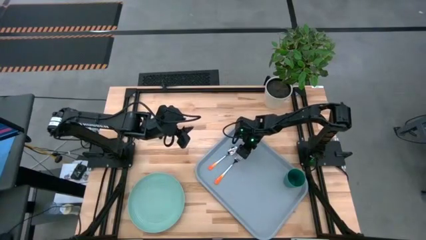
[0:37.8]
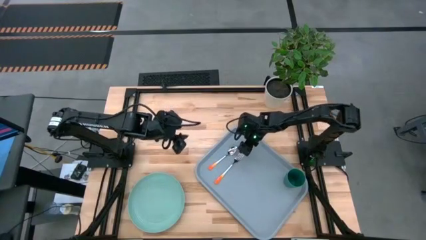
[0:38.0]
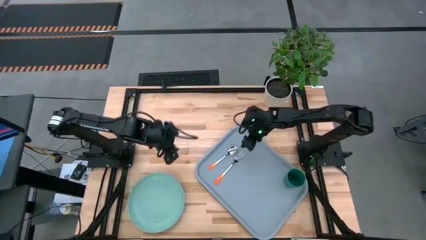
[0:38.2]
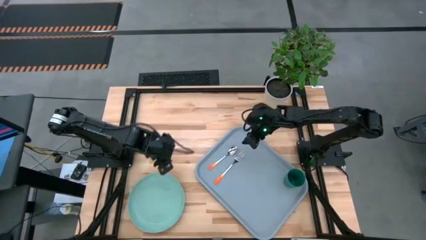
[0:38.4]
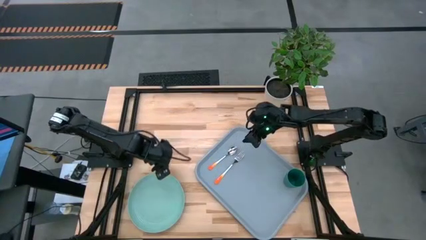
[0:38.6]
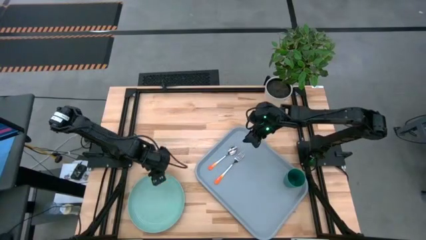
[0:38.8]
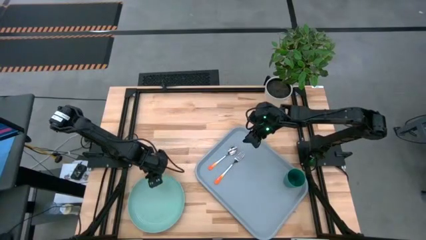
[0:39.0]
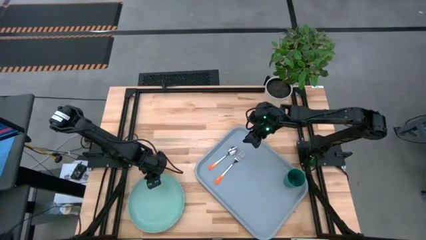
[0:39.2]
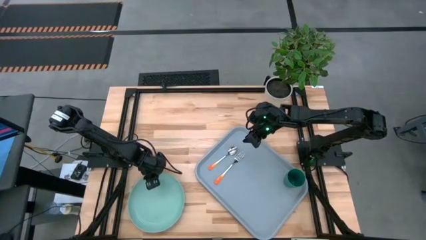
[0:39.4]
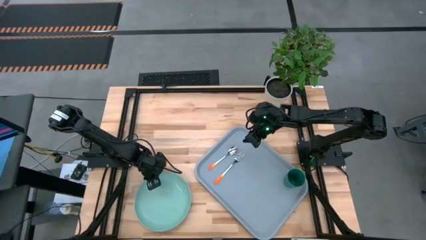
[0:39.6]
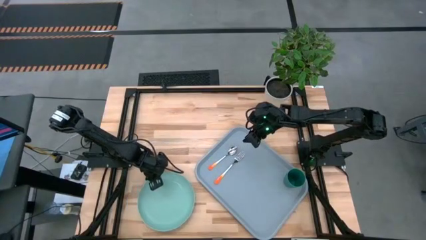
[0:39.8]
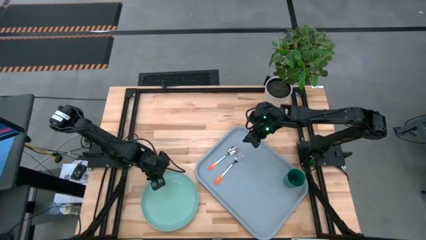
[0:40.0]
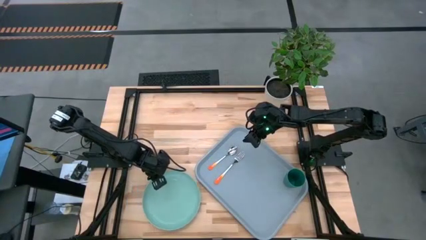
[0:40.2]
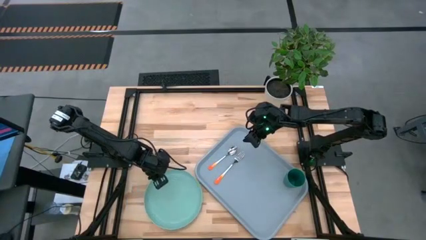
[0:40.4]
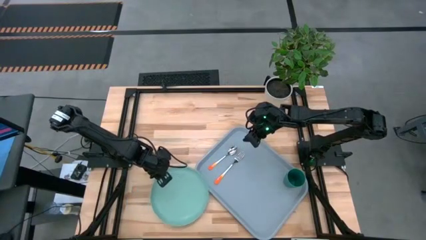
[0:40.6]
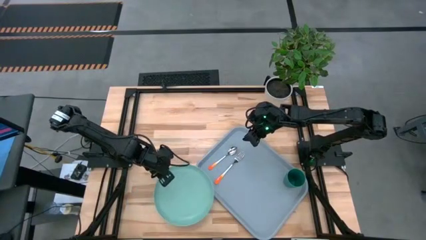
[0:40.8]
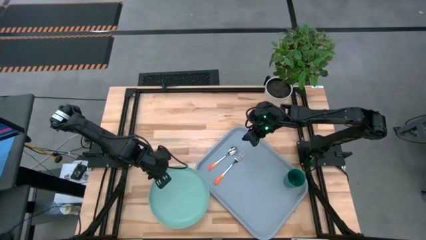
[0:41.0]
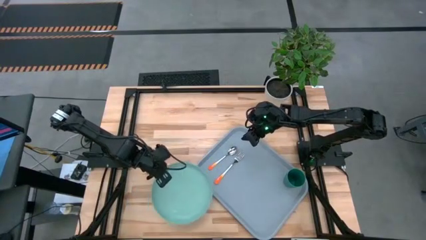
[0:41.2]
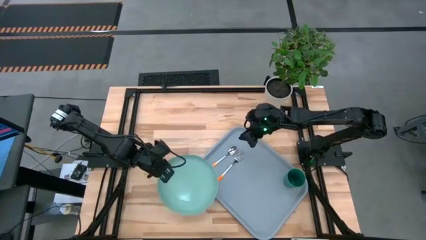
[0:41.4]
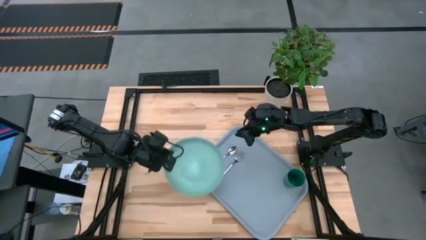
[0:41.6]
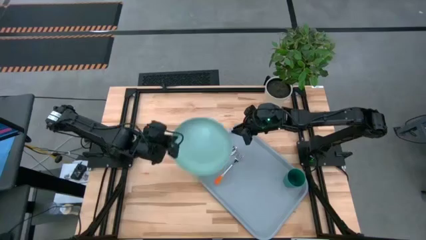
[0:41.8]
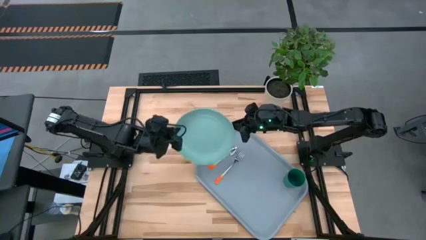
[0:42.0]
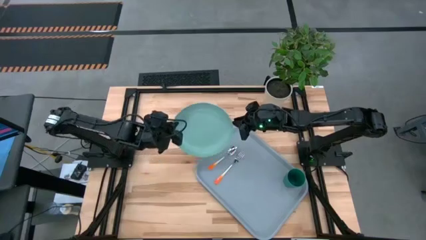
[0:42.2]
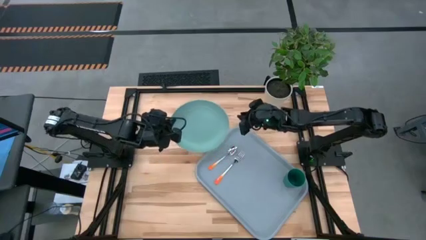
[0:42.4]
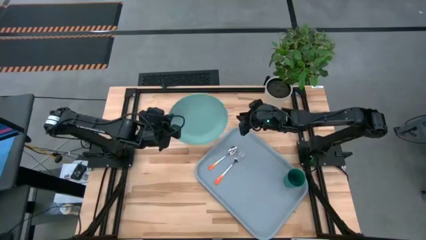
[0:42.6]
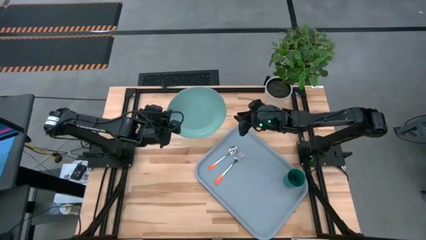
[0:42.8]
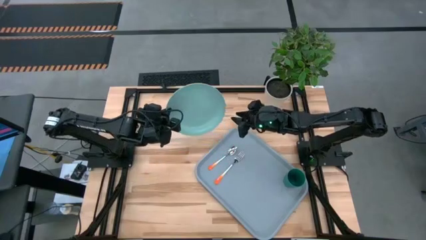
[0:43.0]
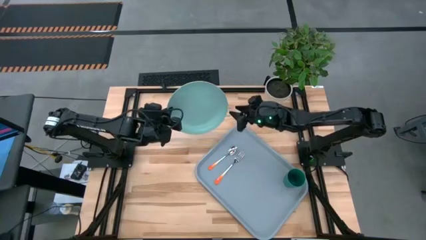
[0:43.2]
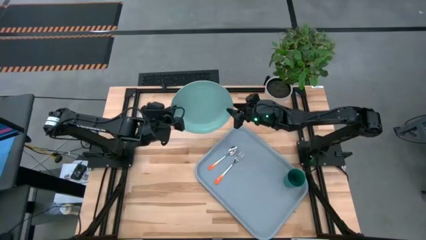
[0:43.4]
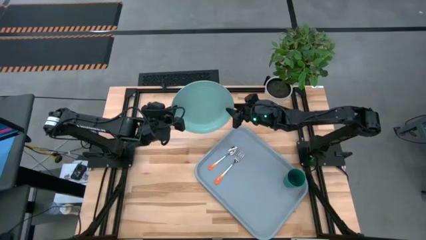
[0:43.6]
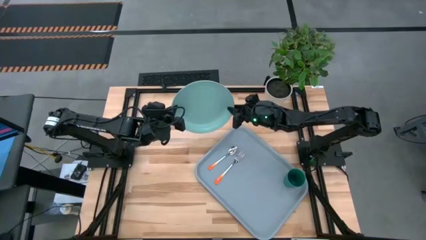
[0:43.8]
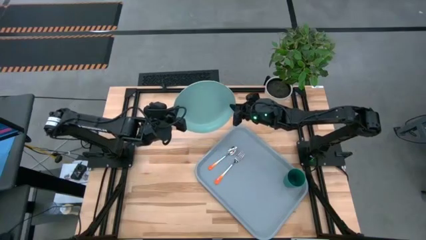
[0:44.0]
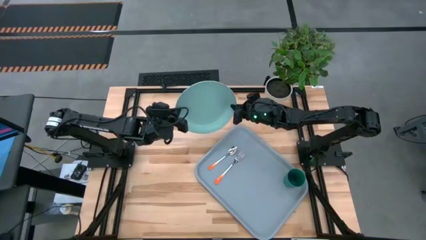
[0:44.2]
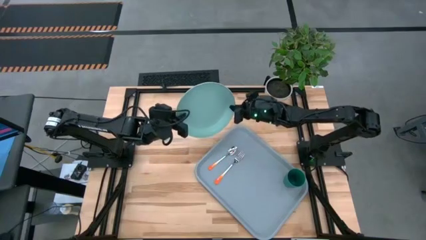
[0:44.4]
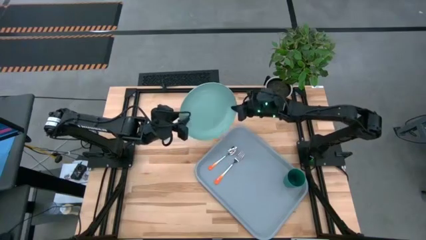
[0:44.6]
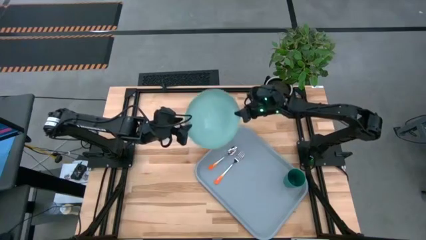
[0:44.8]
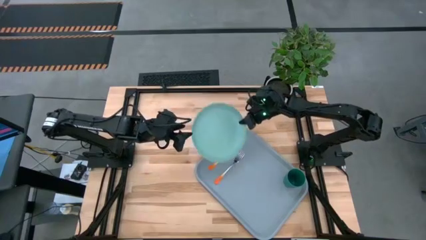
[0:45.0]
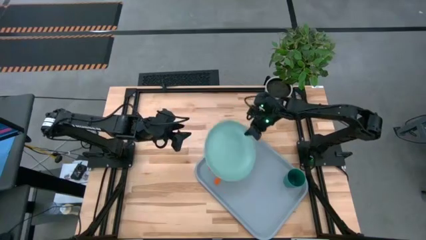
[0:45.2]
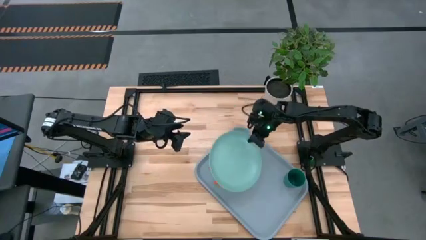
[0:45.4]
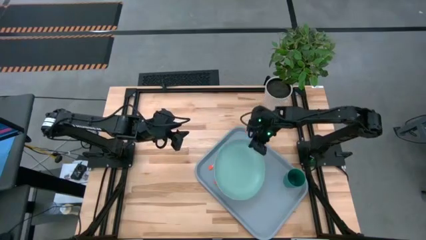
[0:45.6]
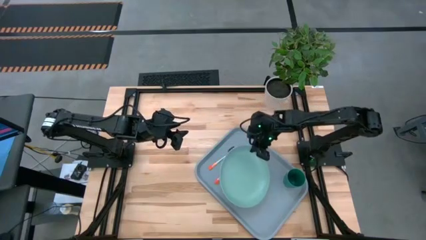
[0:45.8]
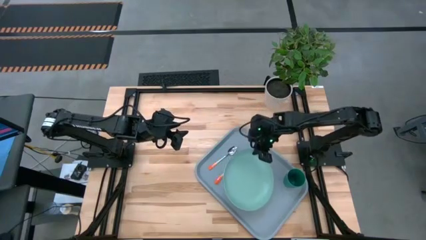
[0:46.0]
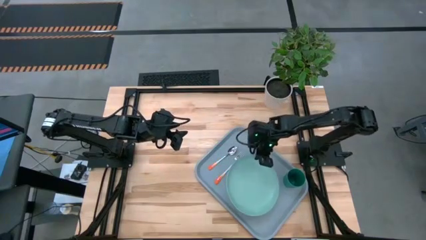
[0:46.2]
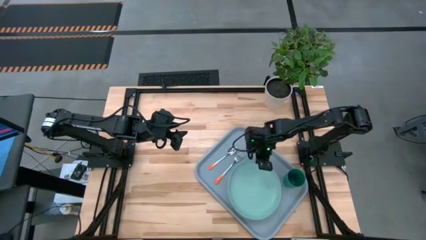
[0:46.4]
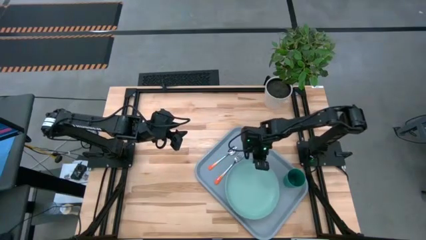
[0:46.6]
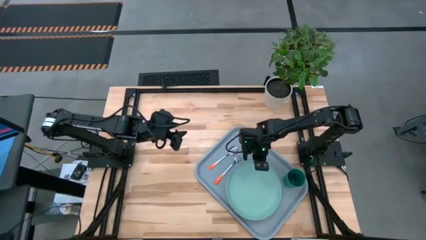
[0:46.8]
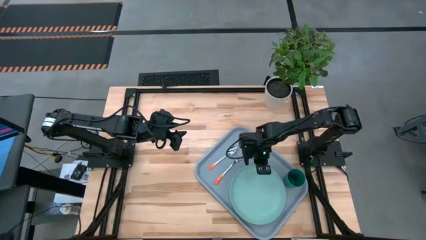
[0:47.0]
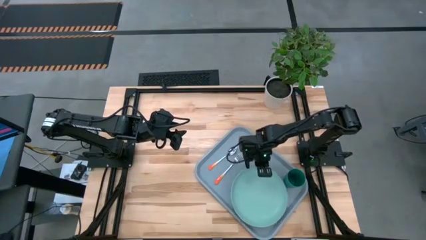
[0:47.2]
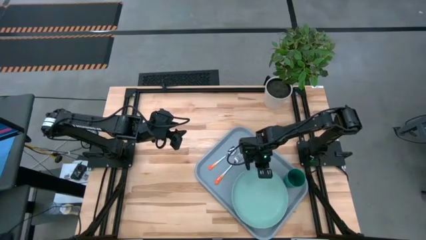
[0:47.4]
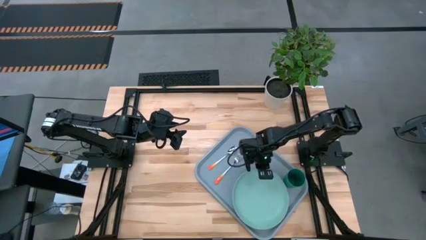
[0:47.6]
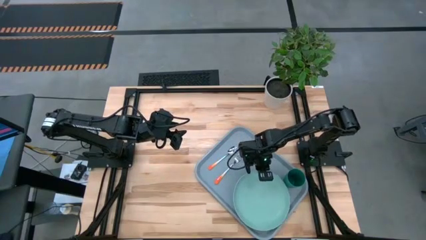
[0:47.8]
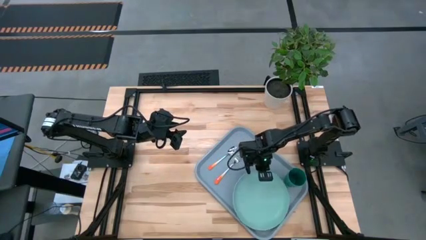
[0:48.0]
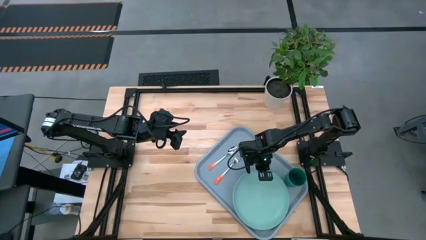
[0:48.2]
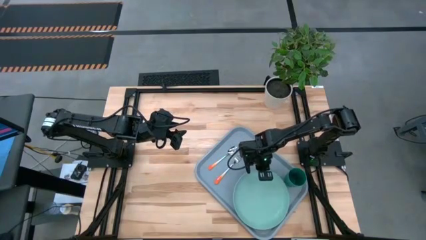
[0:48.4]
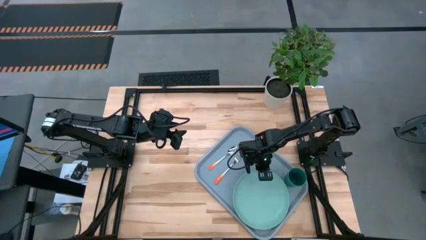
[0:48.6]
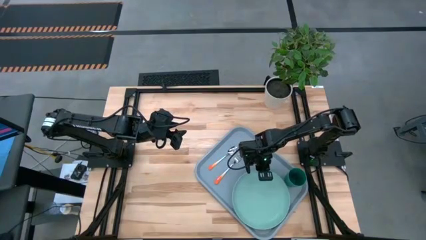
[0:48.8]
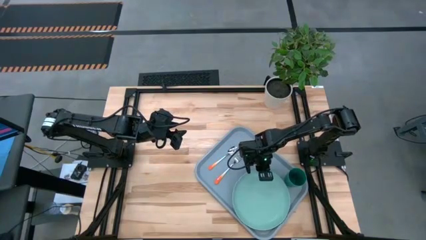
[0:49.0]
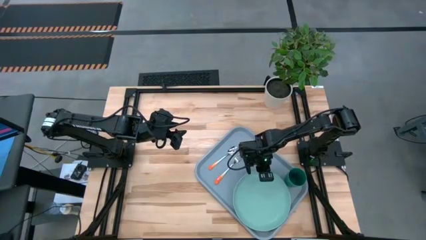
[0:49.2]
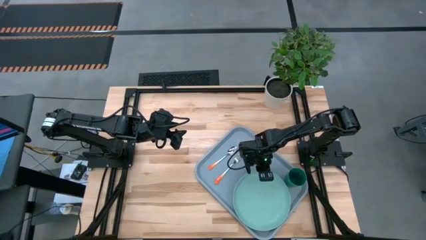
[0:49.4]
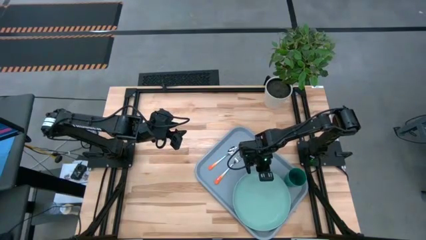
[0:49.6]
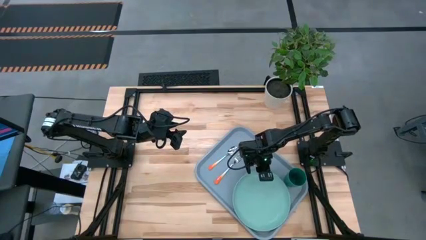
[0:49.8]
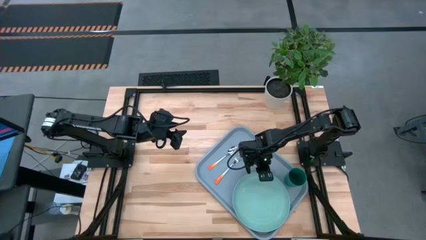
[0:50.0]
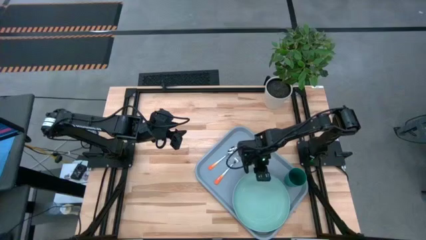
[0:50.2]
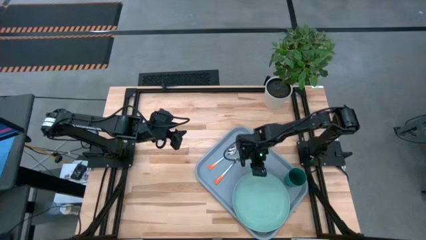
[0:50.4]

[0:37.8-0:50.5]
Task: Pick and place plate/cup/fork/spoon on tray
Put the blue plate on the blue tray to the right of the orange fork

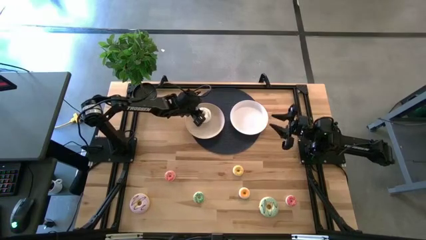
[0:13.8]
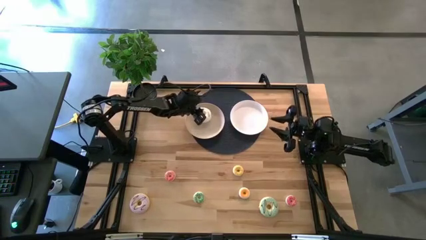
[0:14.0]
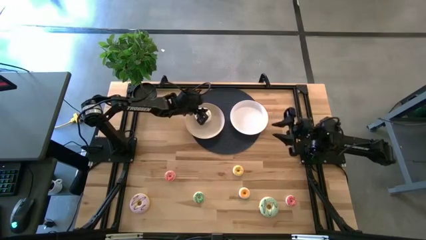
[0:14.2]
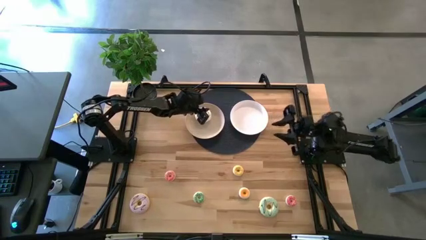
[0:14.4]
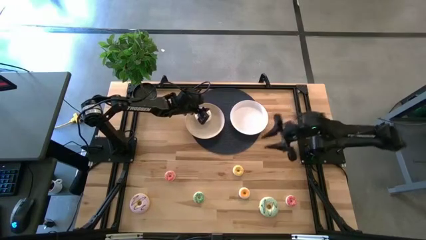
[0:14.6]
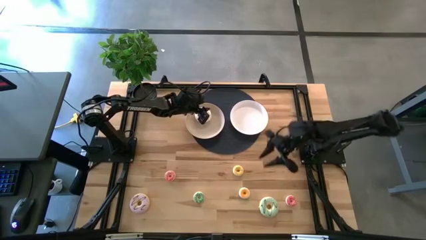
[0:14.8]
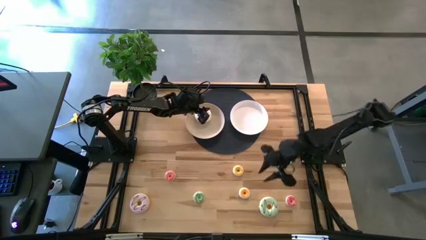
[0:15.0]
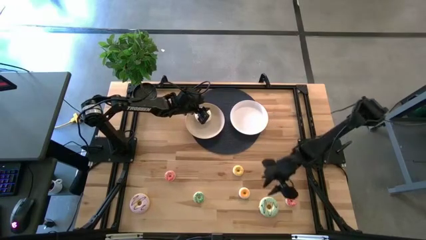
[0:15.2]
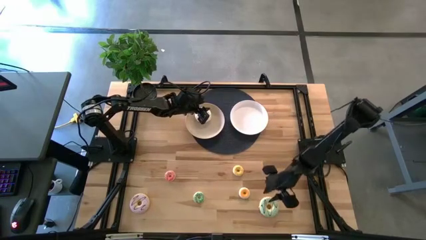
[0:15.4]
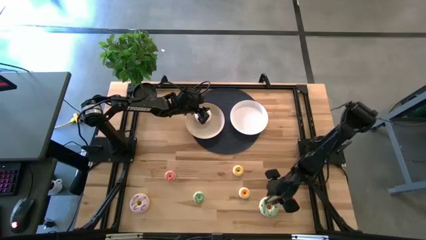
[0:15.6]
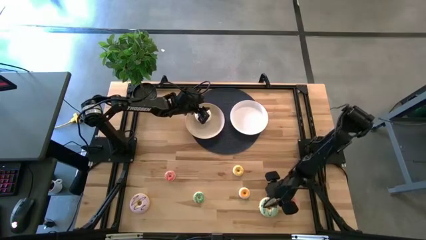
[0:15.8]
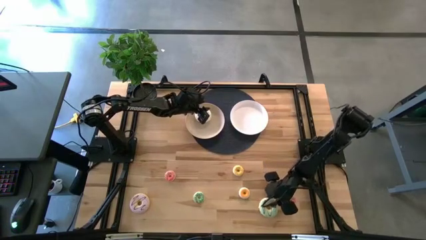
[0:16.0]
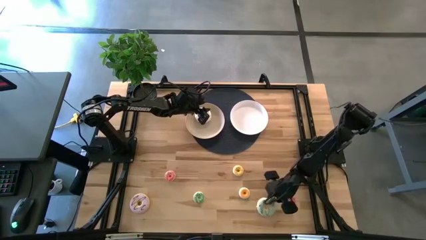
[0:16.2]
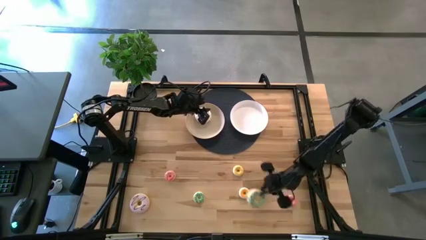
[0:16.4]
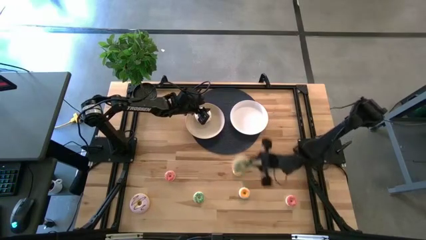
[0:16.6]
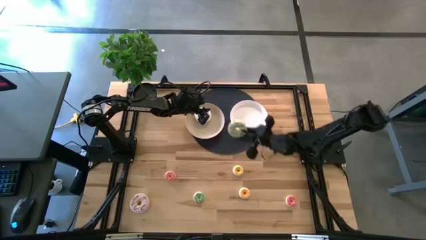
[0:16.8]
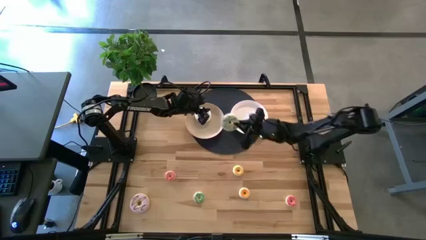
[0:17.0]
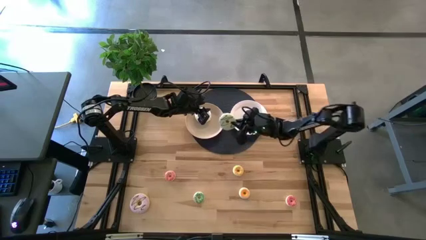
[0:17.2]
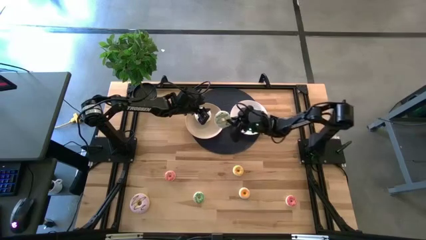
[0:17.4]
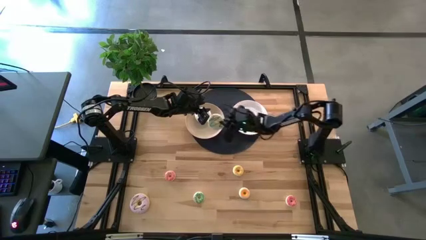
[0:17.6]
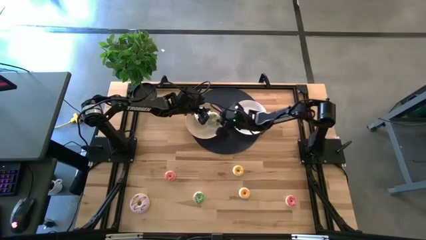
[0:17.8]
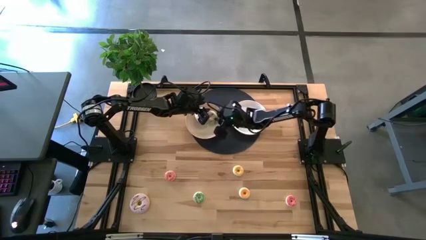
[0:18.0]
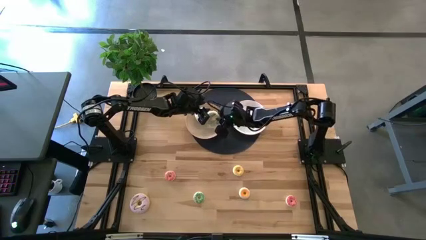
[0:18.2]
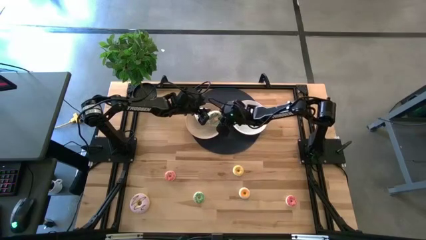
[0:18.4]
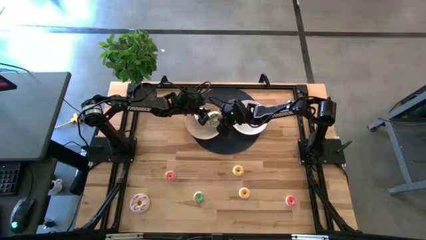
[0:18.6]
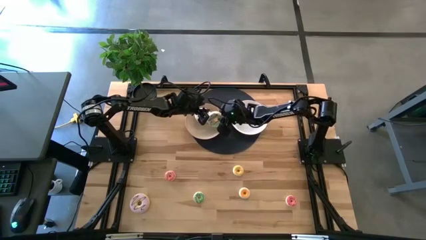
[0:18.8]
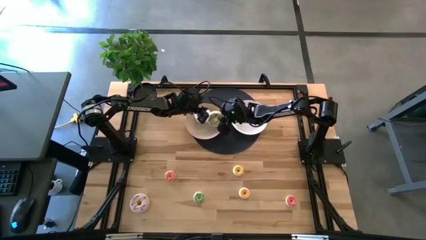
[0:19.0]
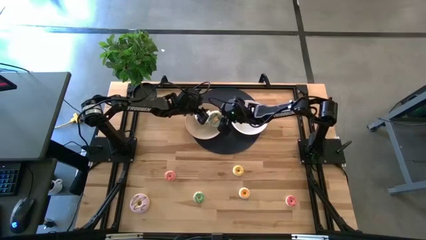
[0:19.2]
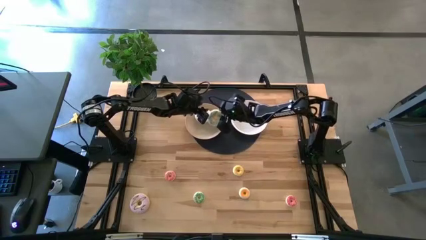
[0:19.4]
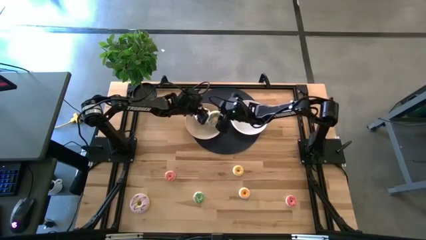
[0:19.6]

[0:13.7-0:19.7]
Task: Pick & Place donuts
Put the large blue donut on the left white plate
